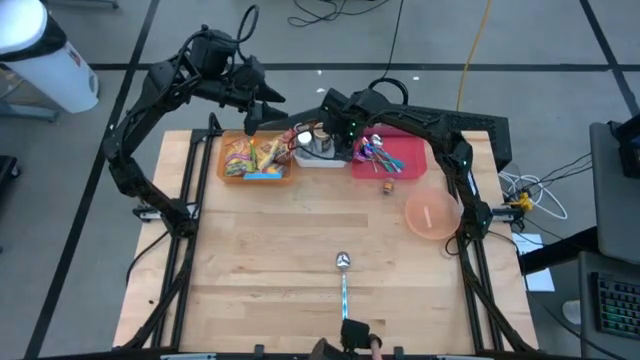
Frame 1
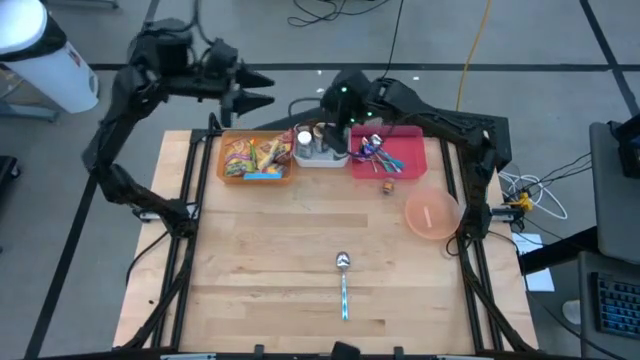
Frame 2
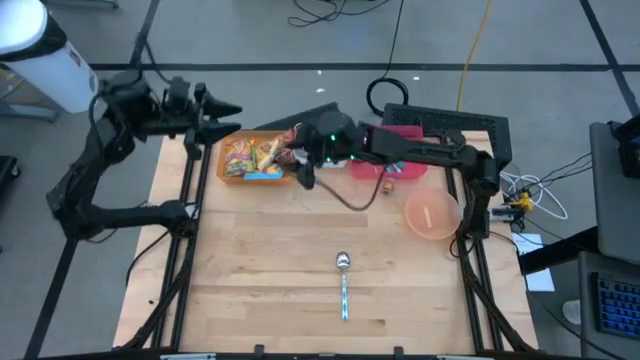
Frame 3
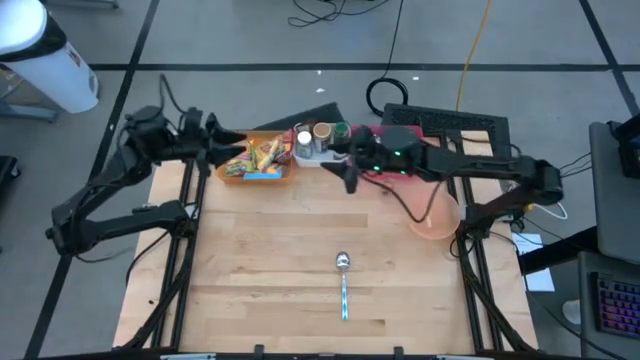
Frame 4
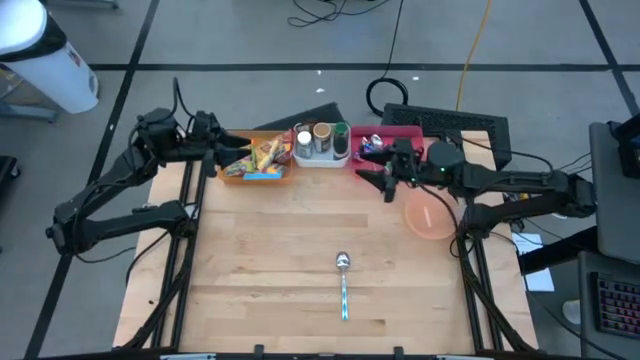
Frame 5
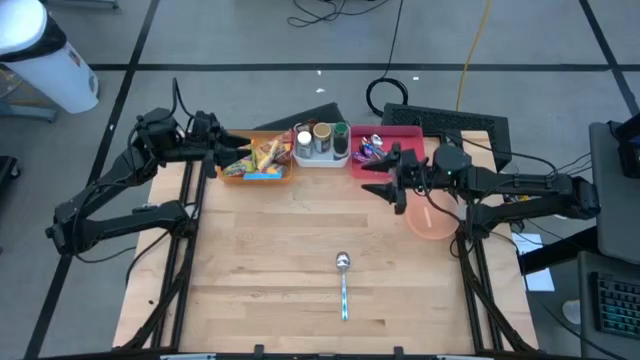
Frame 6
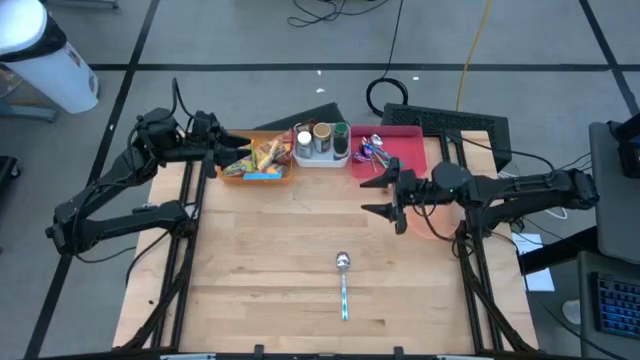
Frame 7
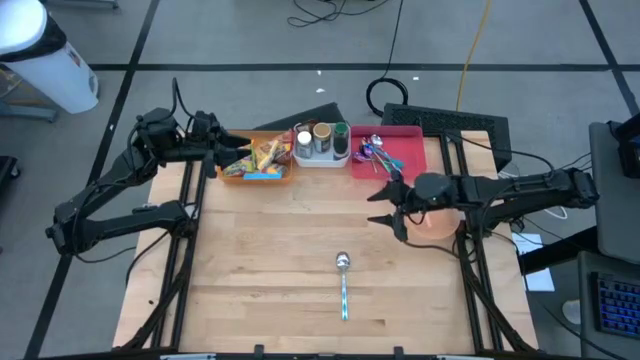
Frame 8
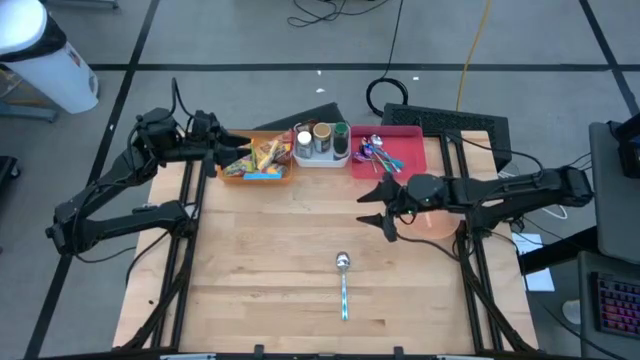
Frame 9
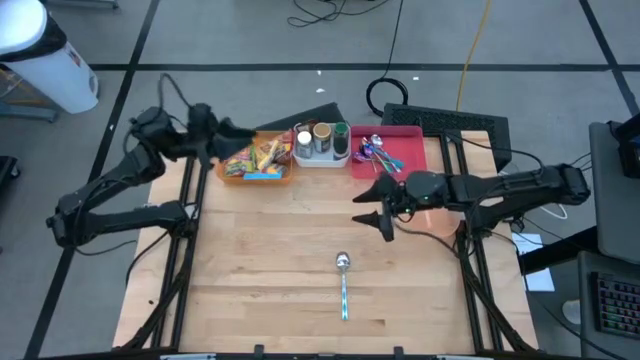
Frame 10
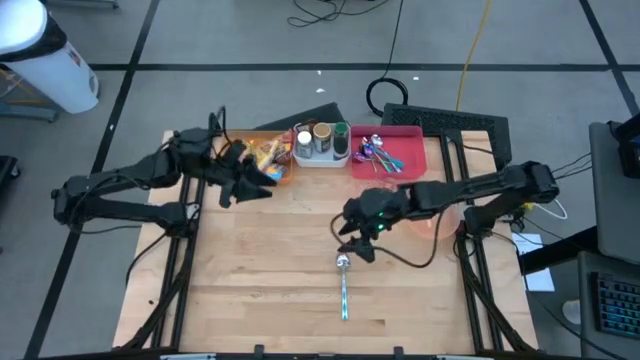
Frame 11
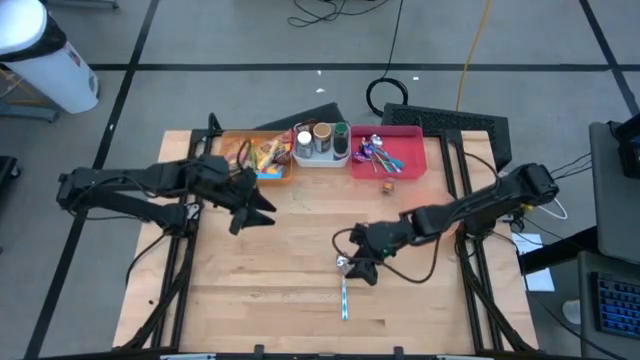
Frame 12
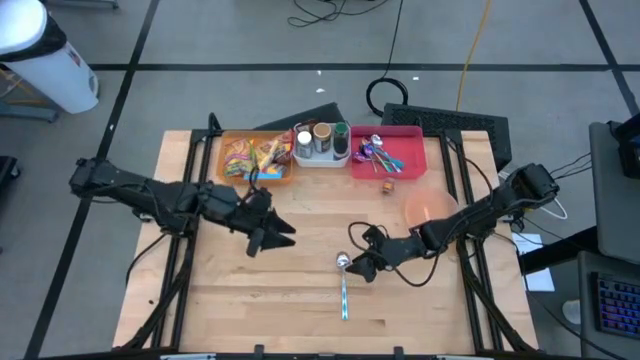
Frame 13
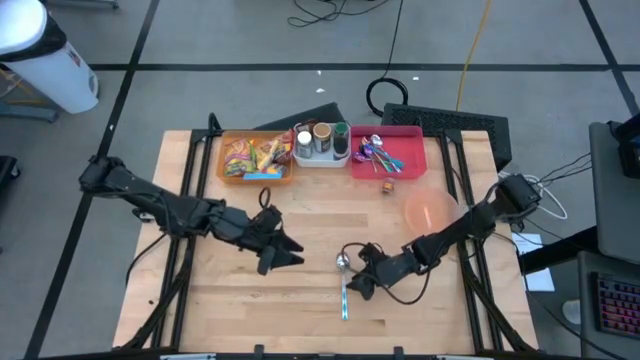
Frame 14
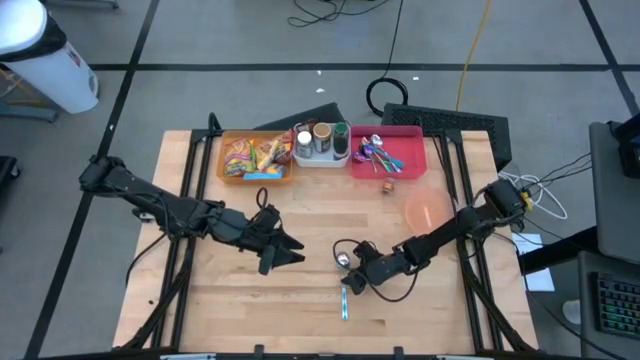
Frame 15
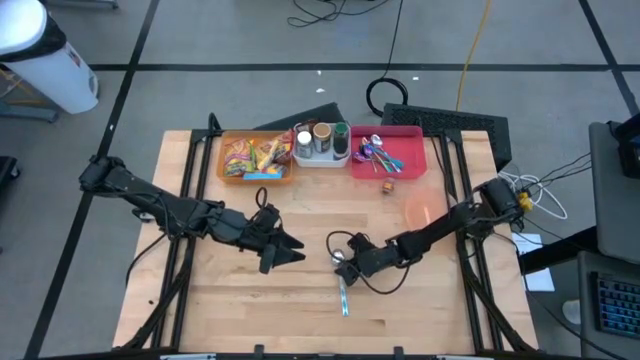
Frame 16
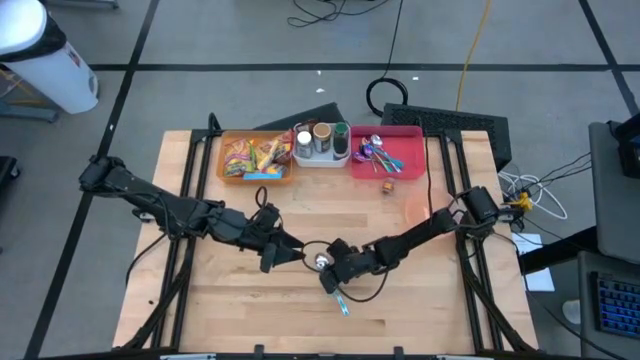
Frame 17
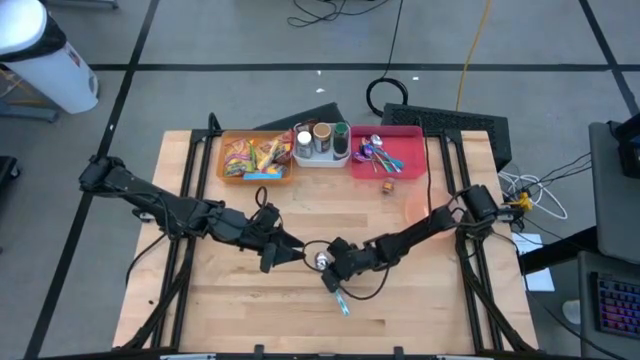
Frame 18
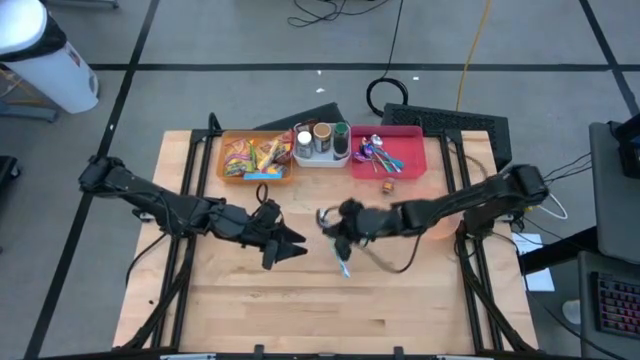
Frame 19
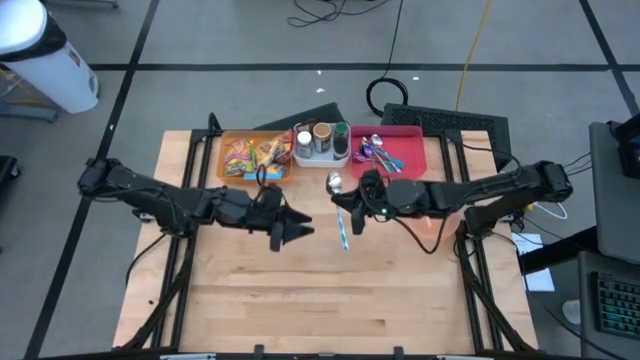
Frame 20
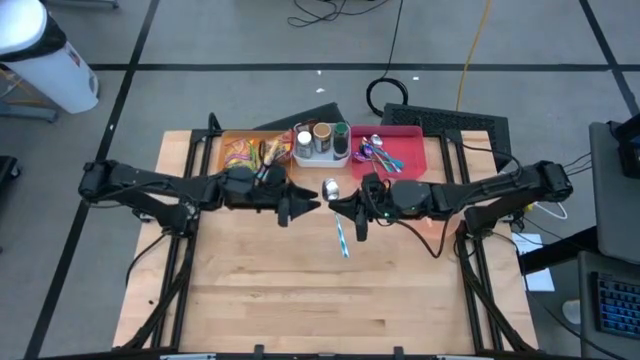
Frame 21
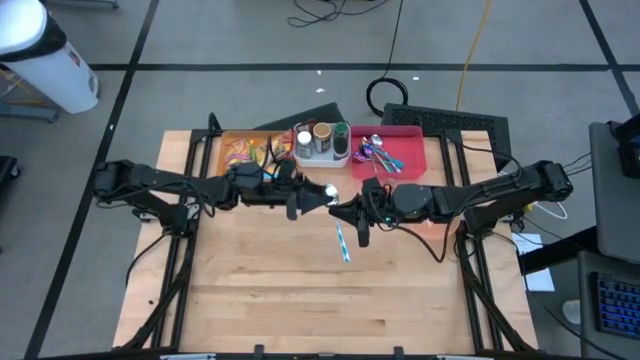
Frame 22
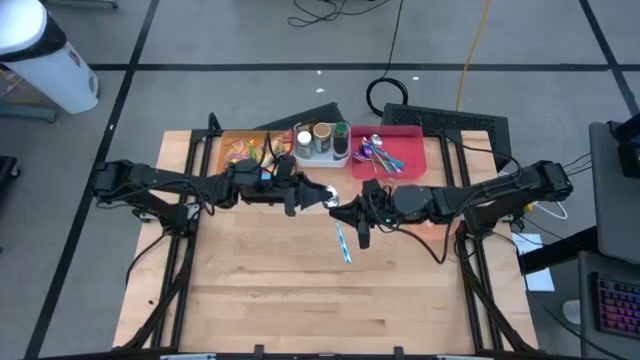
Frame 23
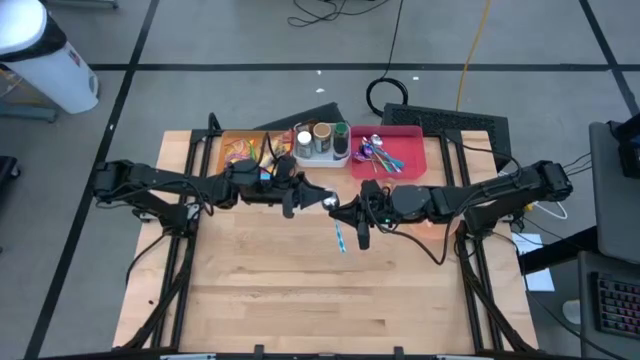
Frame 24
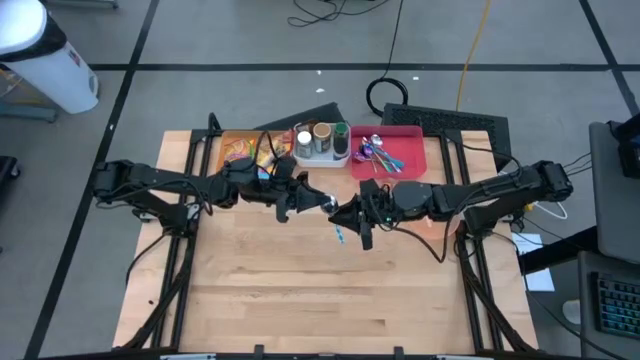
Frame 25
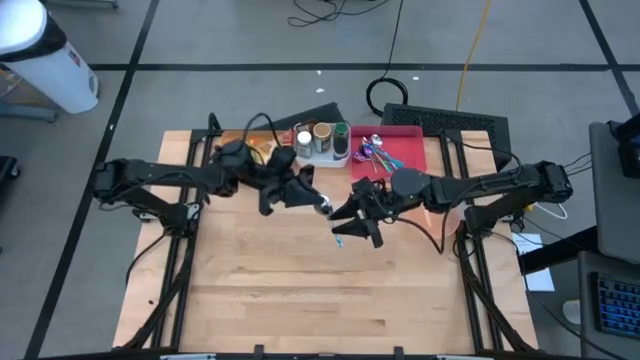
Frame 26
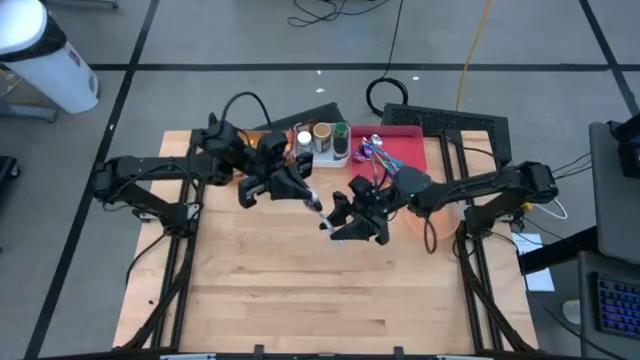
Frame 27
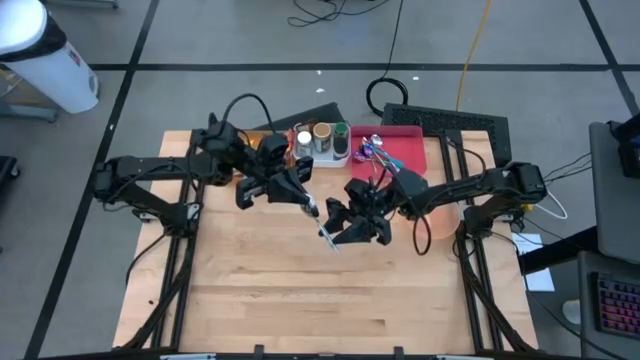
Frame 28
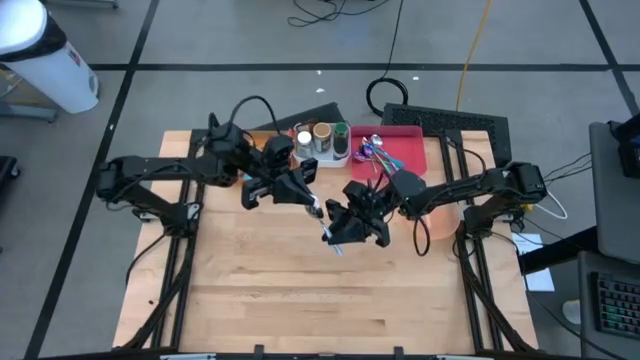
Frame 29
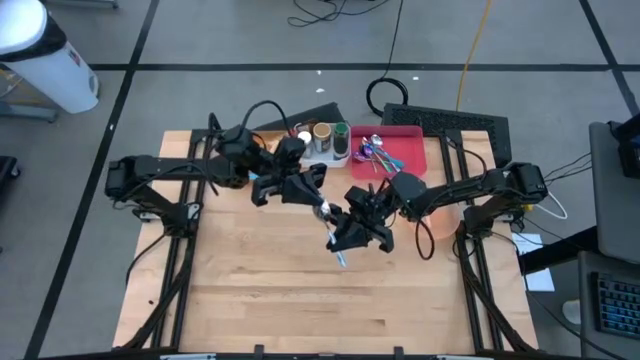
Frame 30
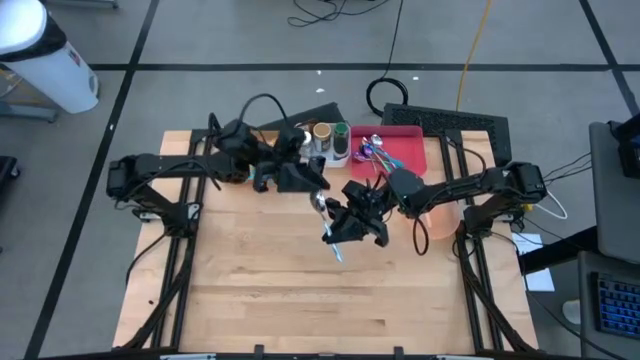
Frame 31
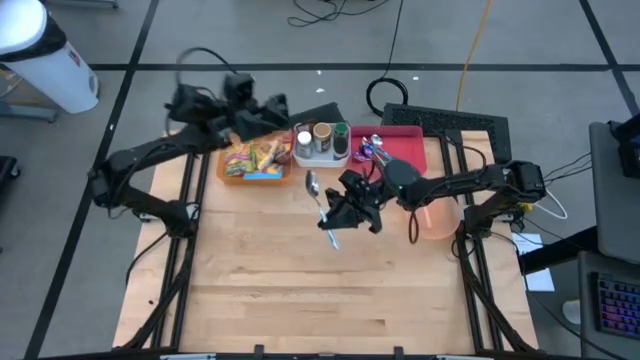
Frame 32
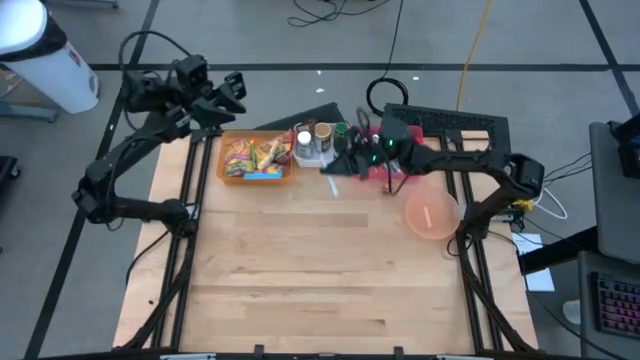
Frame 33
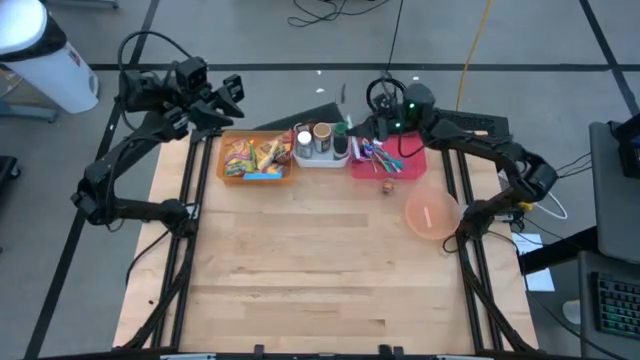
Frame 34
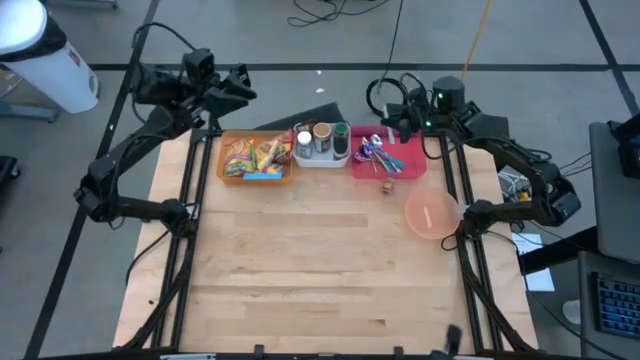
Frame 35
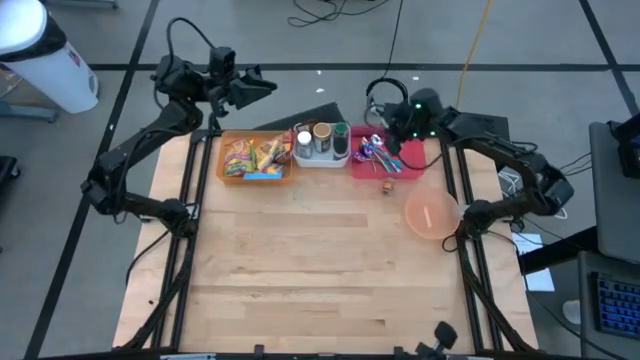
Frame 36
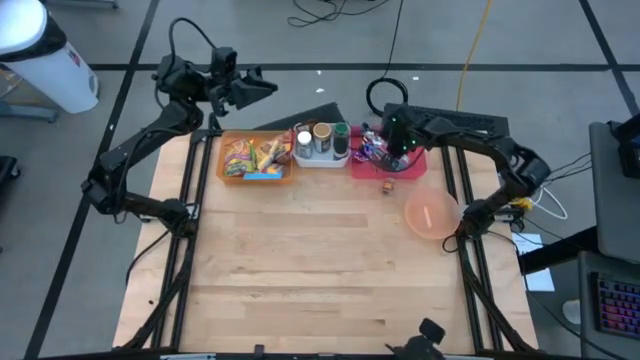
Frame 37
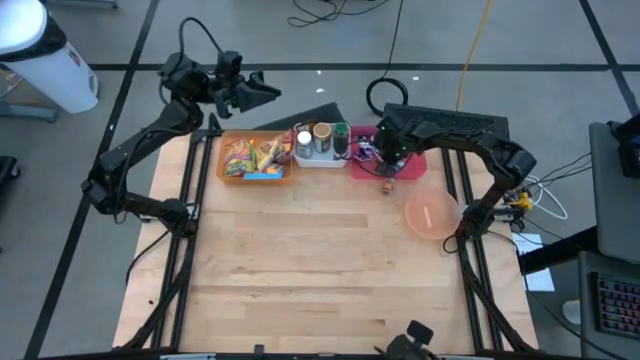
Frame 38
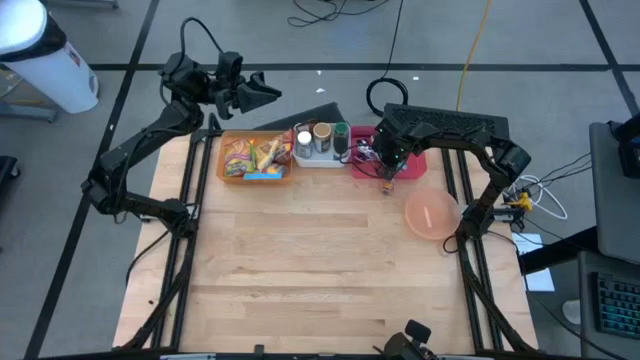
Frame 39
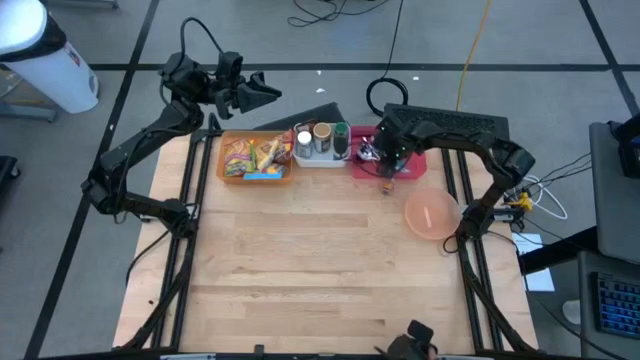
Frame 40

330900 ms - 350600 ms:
Task: Pick & Place Food Item
Put the white blue spoon into the red bin
